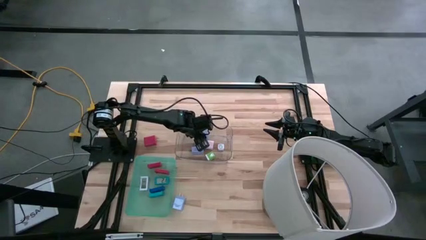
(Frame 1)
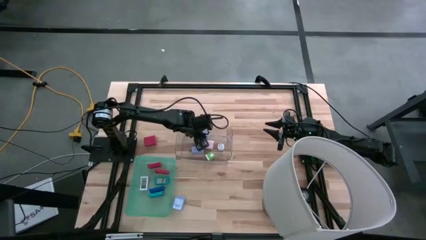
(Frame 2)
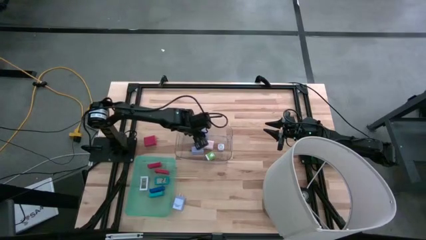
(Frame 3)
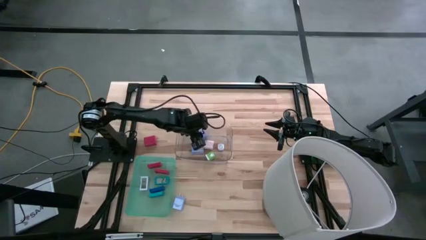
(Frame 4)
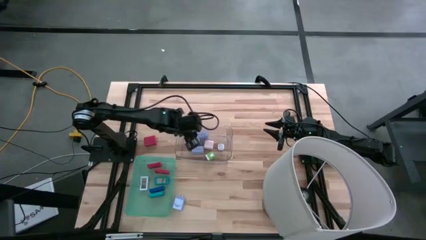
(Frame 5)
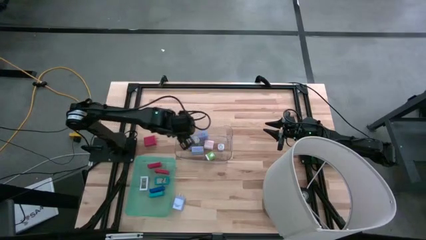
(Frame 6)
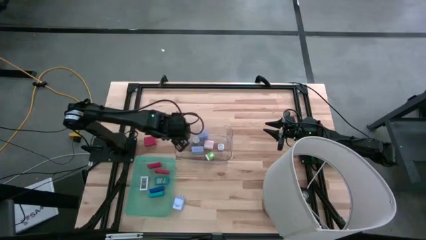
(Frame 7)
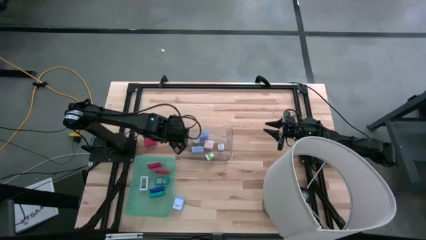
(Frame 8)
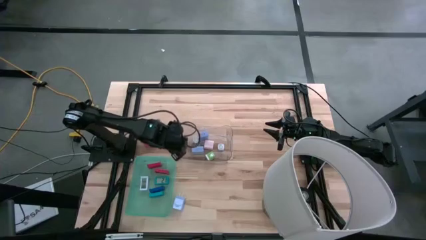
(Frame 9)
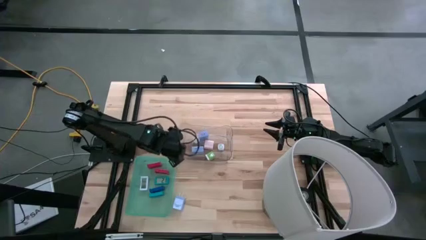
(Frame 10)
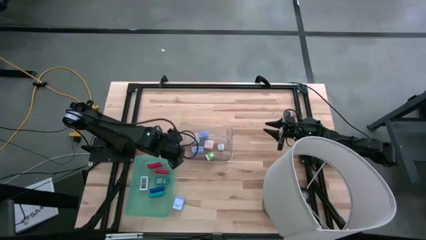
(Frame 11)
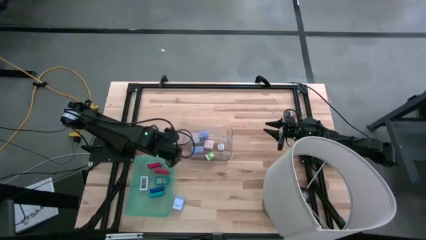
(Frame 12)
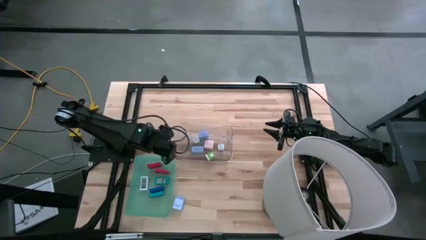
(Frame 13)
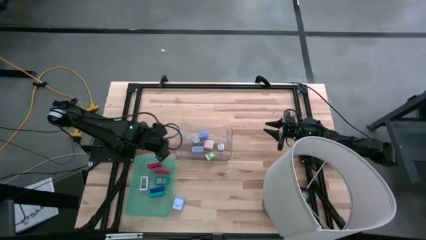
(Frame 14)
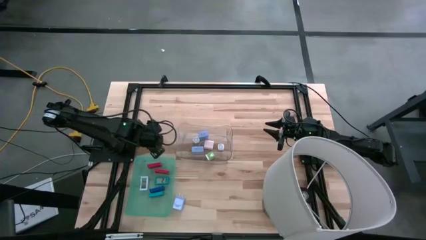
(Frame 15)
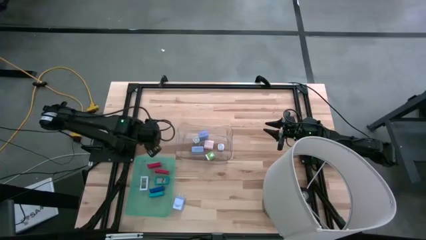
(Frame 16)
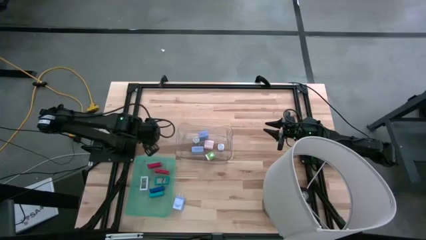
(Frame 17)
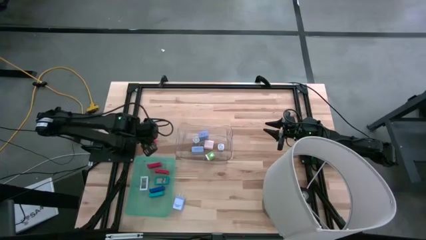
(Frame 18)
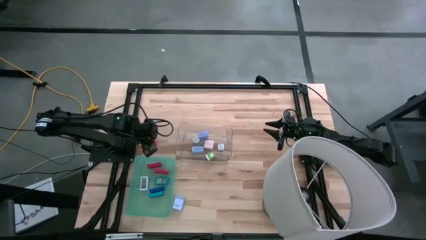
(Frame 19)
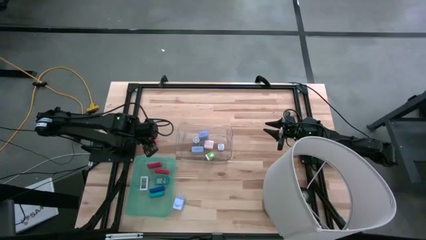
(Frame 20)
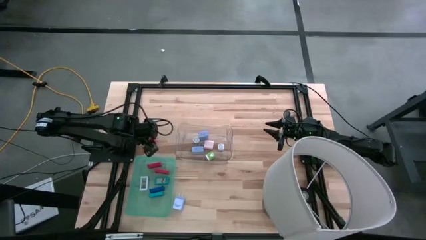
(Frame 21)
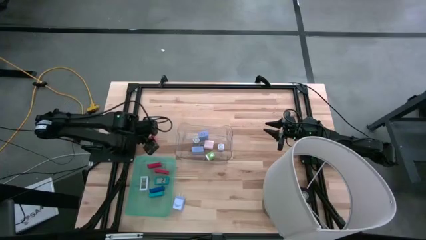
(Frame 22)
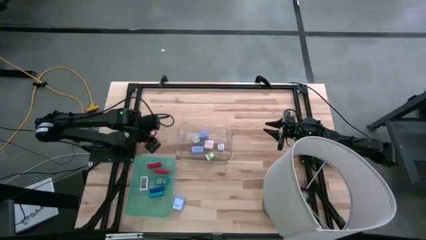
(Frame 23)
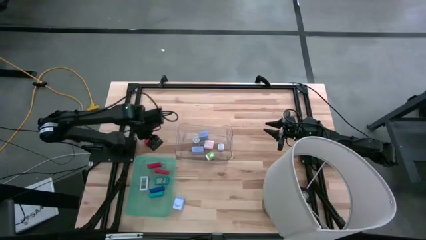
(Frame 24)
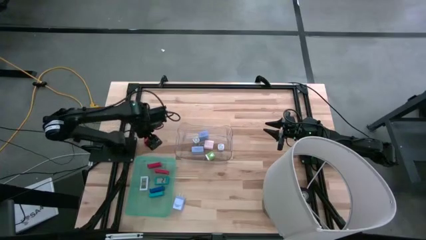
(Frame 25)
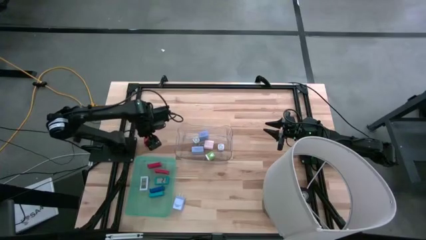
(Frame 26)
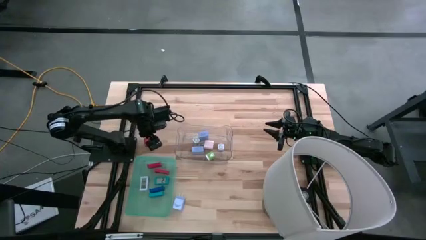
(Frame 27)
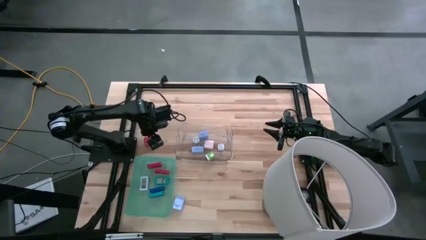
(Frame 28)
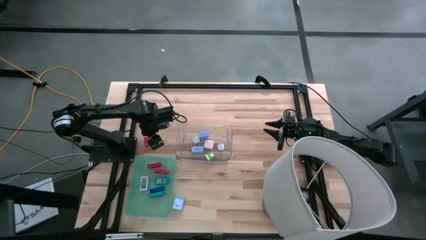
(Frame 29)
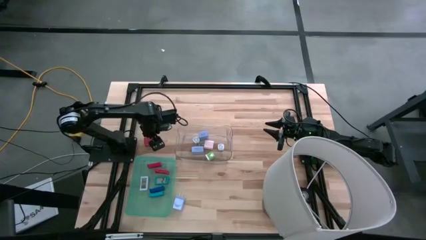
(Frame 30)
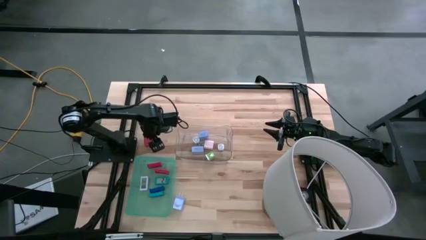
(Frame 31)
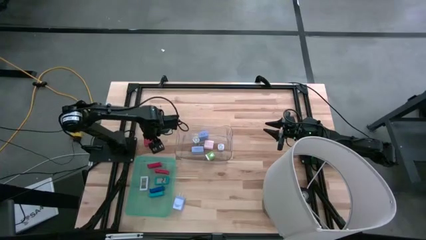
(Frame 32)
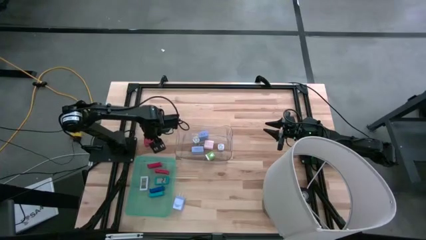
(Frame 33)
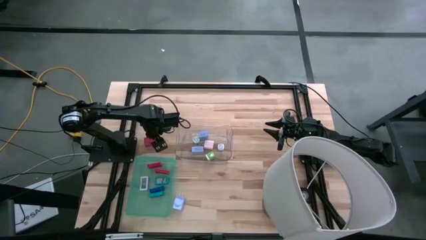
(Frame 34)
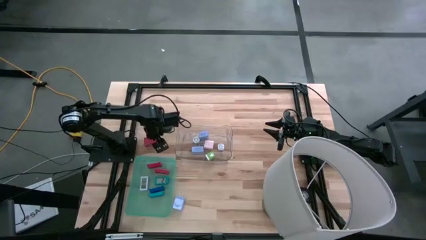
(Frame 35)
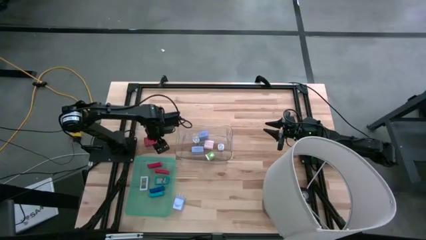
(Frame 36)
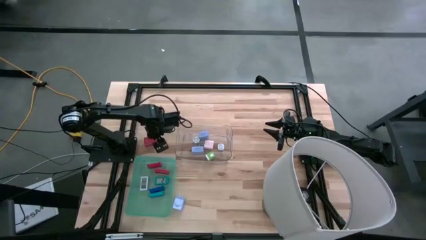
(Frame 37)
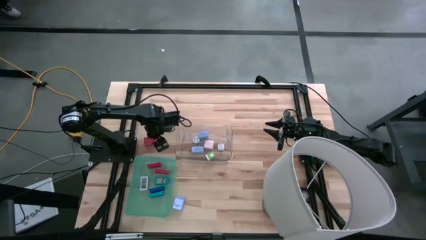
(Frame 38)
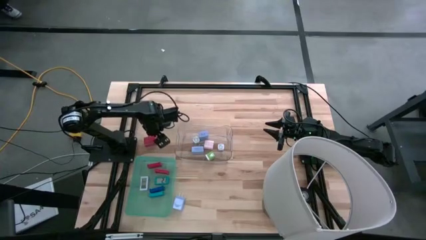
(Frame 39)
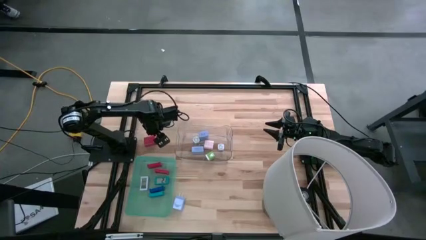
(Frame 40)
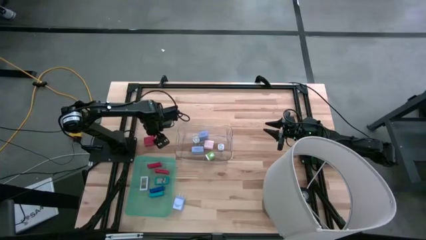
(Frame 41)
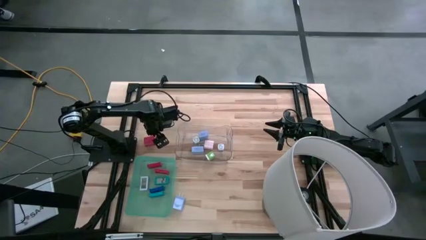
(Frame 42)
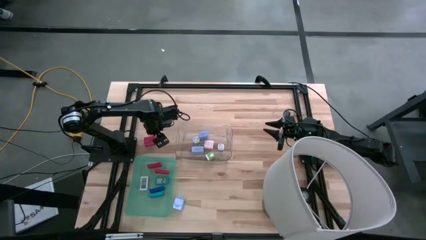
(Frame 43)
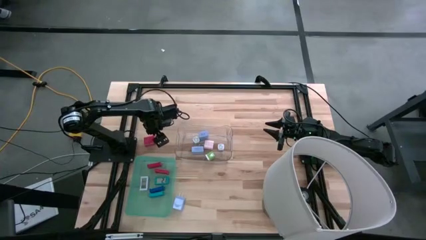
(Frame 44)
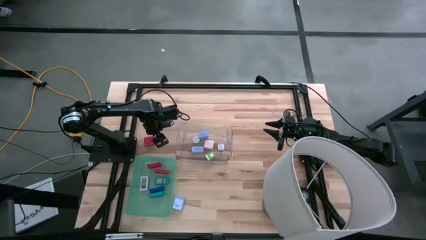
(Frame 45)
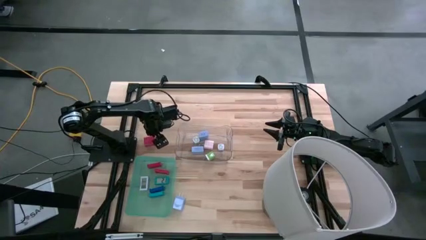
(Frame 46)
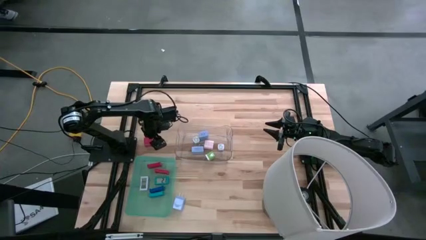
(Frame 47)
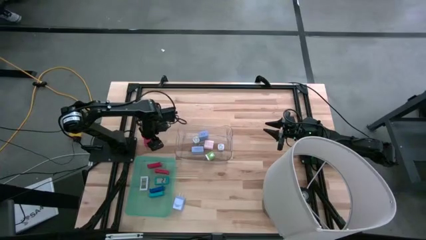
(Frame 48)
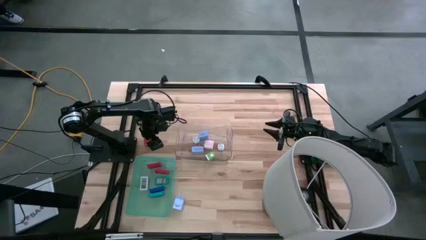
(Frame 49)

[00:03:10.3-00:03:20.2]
Task: Pick & Place Office items
Put the red charger adapter into the transparent bin

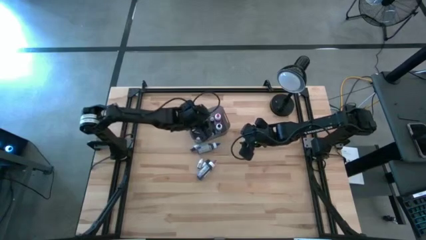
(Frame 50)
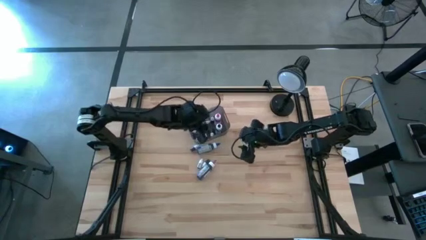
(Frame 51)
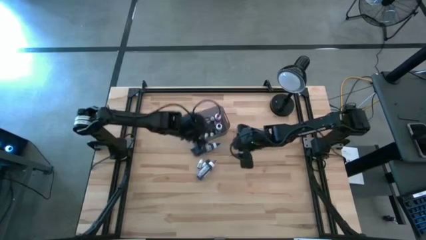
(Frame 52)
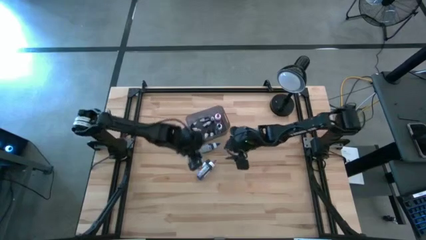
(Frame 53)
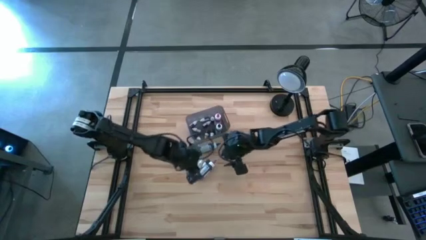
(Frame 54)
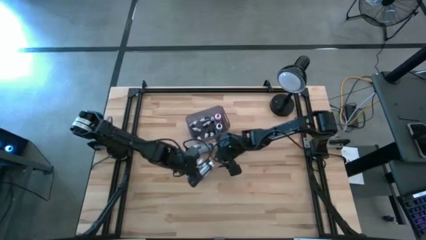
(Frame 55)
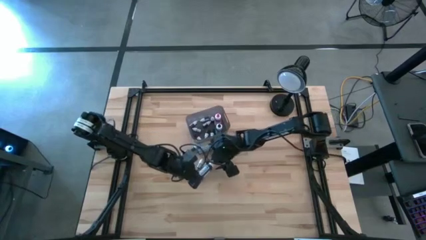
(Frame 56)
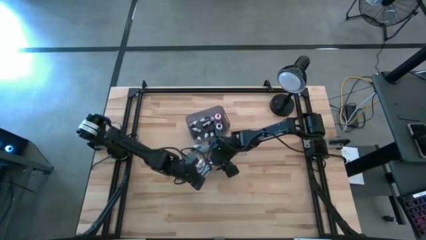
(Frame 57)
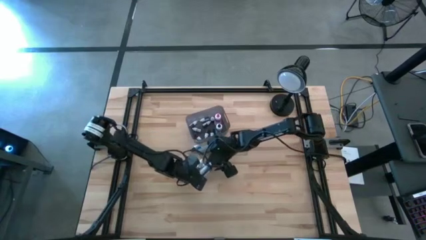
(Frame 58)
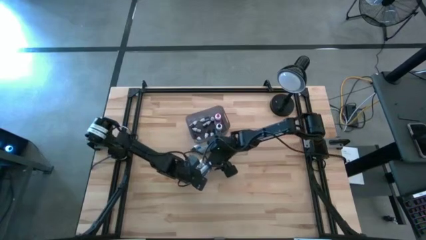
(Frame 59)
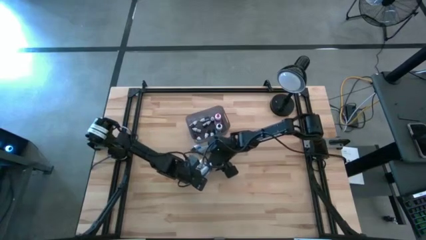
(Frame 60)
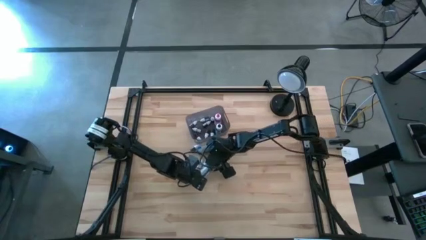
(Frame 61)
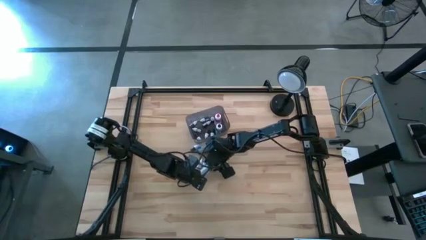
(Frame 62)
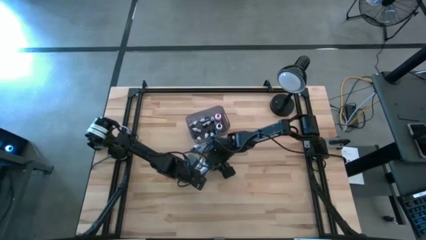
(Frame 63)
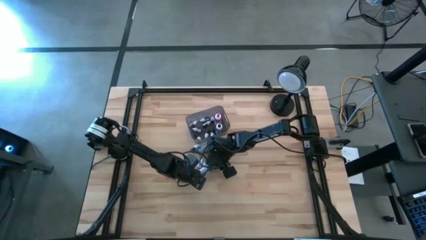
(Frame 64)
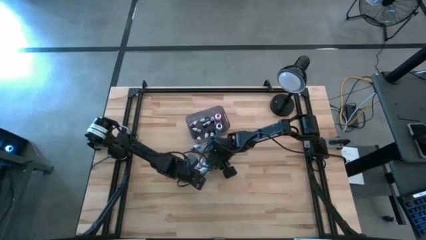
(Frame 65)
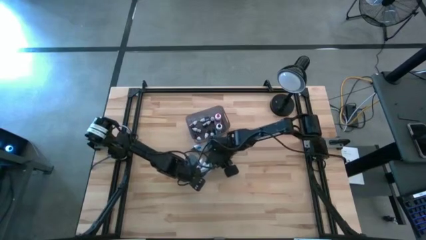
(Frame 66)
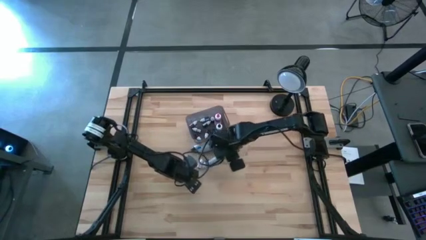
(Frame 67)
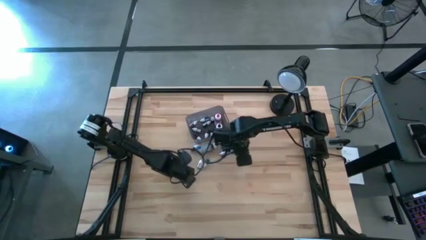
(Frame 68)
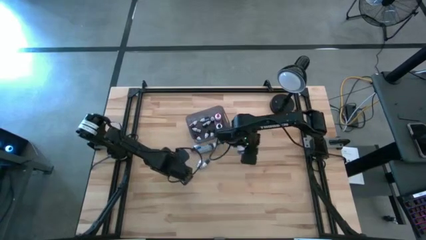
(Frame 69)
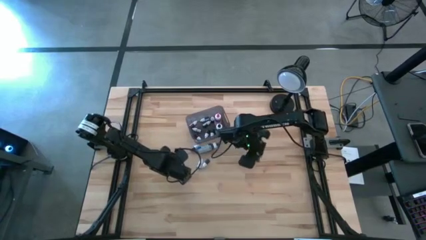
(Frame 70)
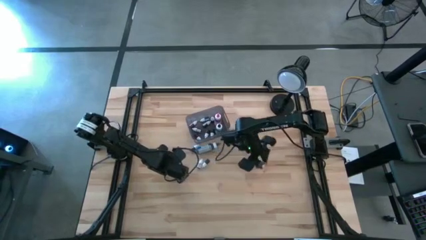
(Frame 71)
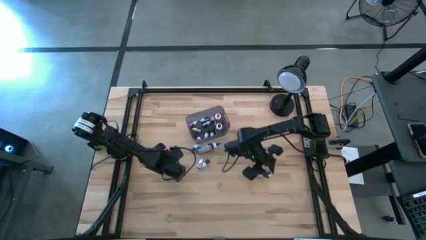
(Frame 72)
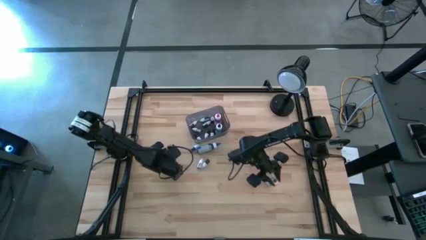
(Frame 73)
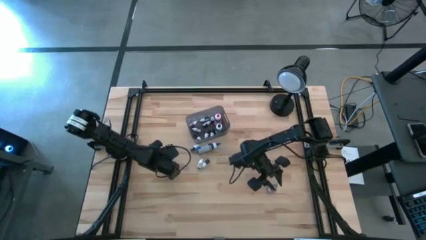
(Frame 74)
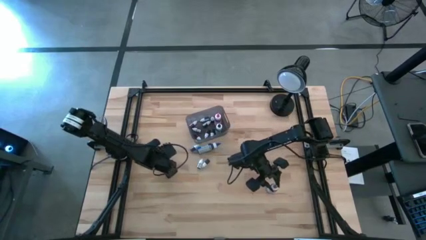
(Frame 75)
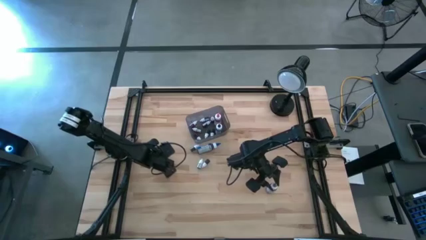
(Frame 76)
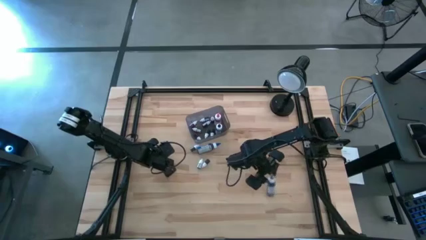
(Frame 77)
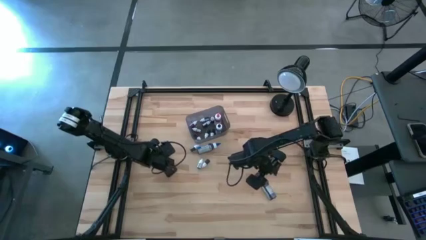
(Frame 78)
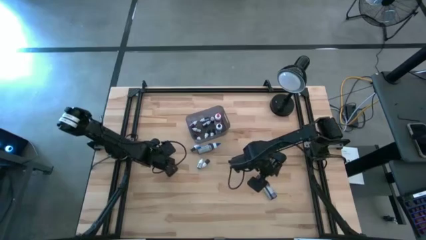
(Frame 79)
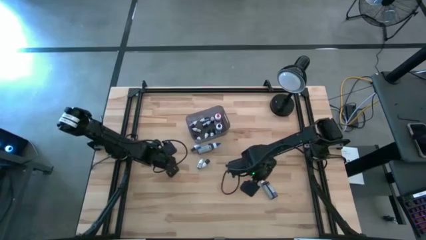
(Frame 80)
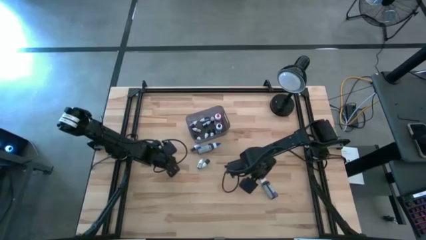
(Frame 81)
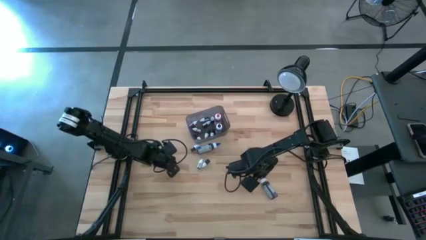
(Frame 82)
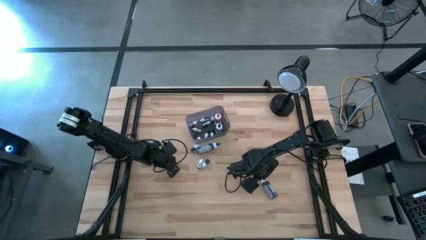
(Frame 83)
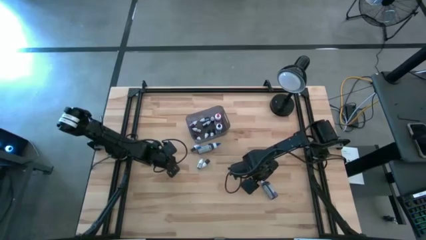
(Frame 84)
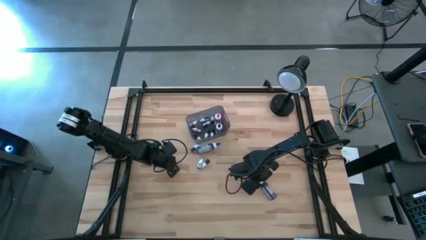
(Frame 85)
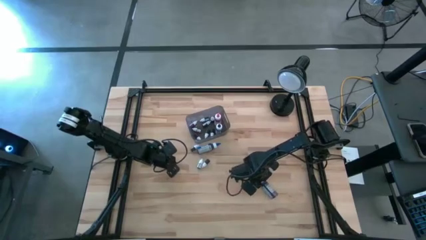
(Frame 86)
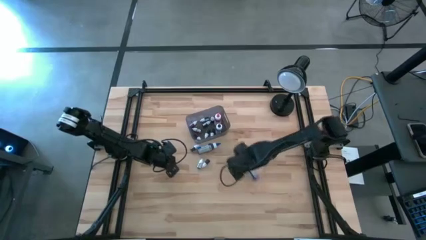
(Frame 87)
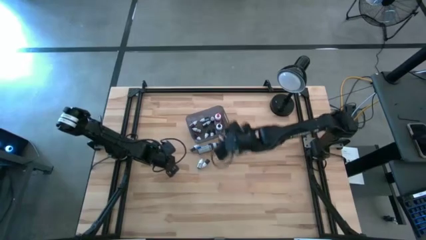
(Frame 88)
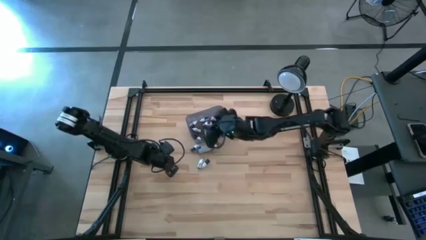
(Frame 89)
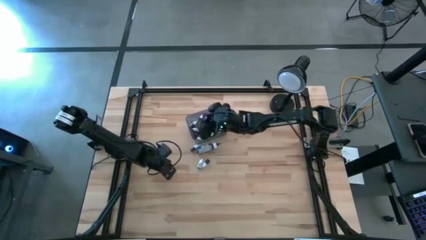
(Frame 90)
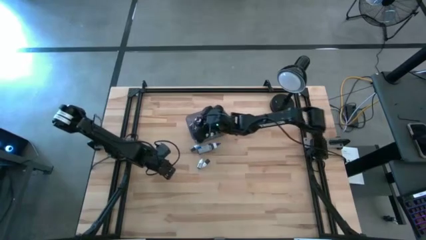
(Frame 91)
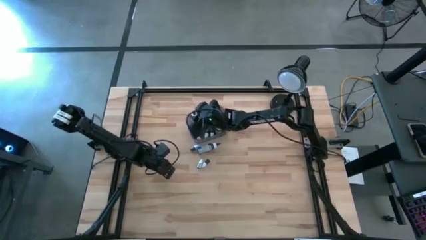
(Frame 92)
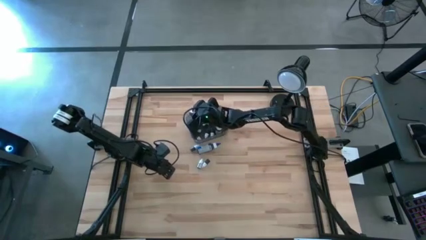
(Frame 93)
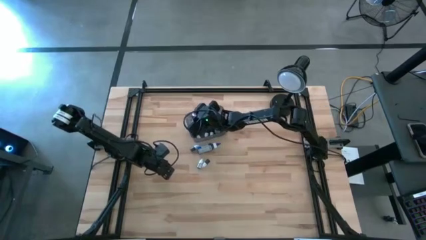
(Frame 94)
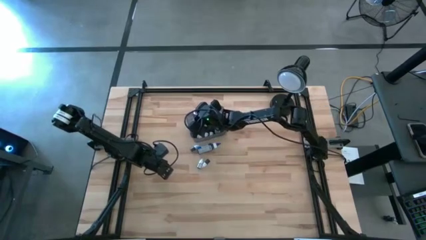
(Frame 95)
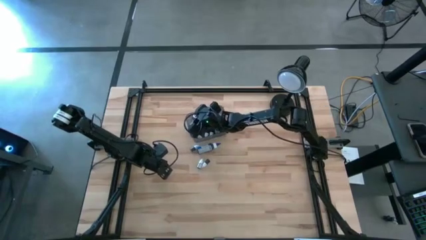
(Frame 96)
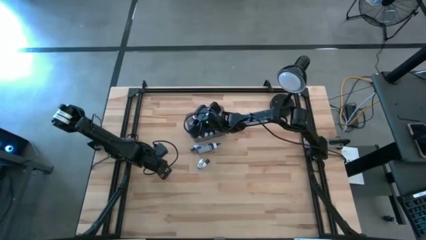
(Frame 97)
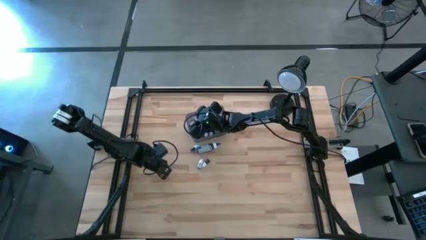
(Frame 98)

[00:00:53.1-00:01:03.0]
Task: Pick & Place food coloring
Put the large purple food coloring bottle into the gray bin
